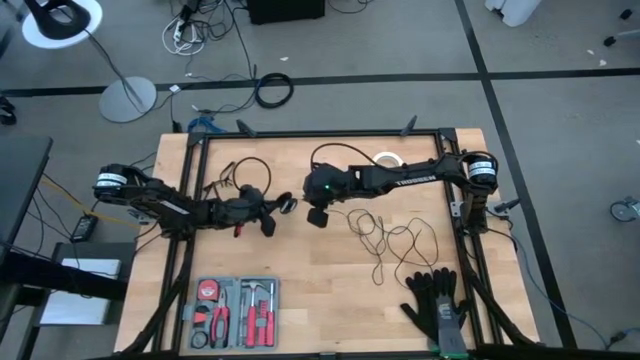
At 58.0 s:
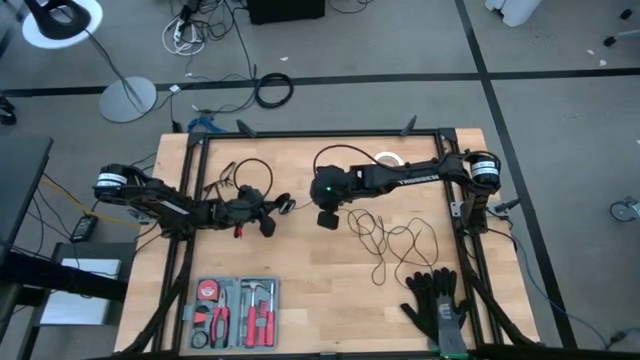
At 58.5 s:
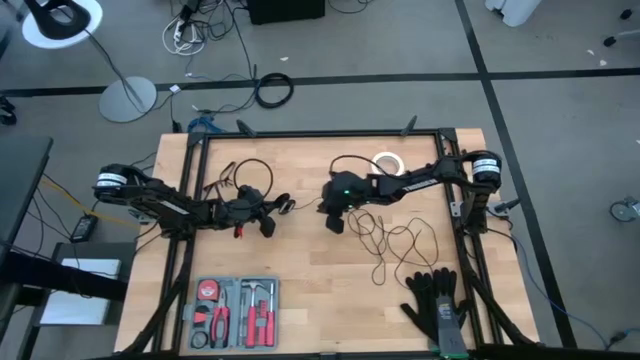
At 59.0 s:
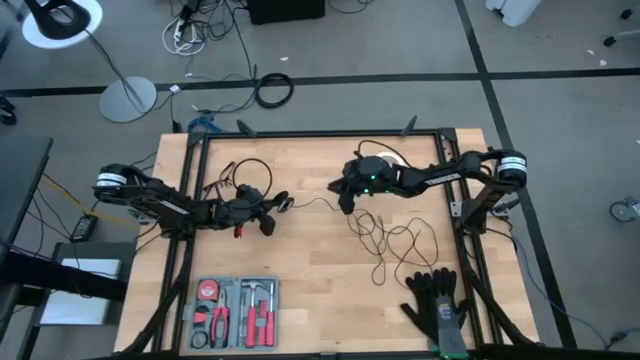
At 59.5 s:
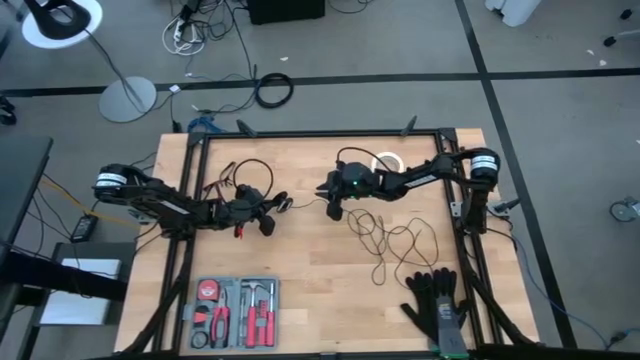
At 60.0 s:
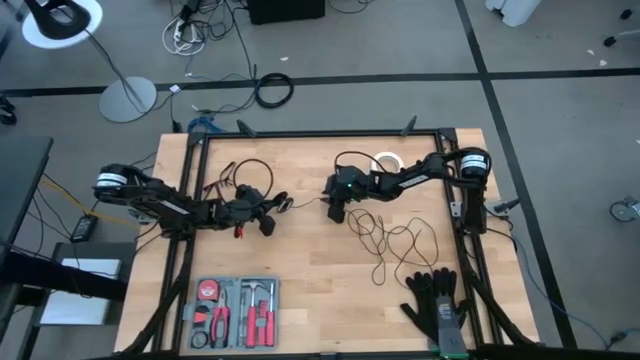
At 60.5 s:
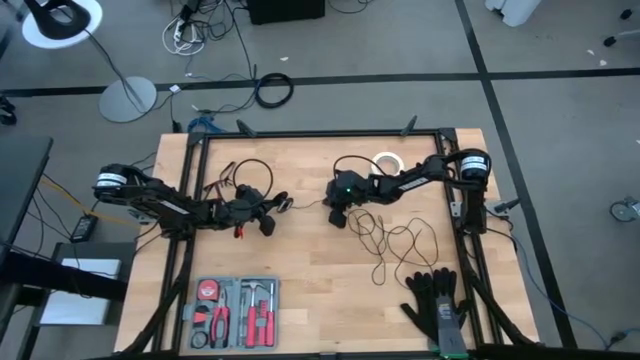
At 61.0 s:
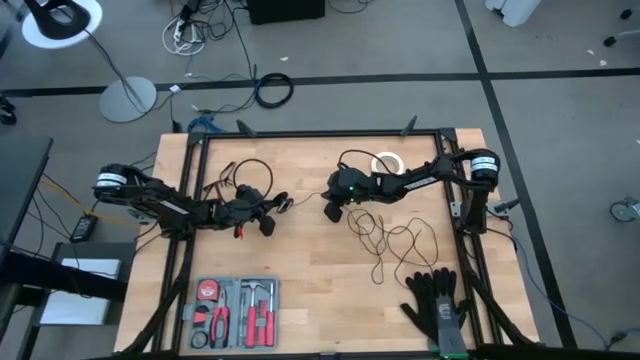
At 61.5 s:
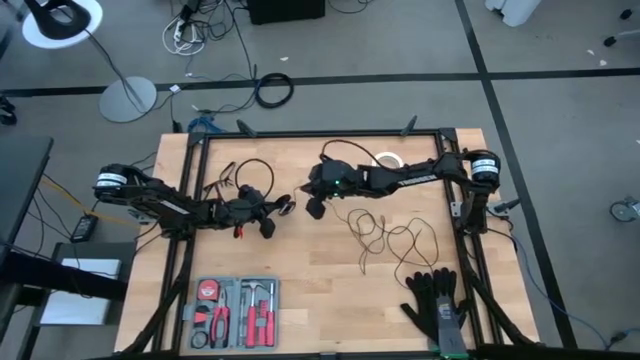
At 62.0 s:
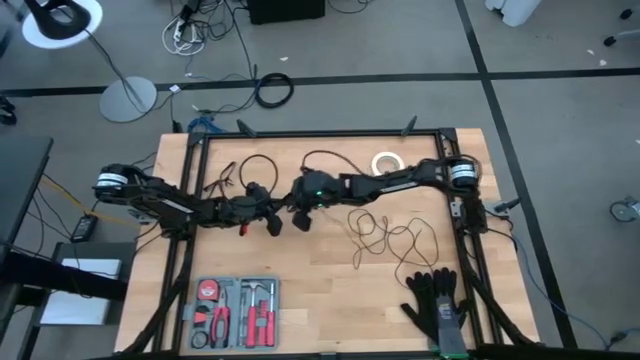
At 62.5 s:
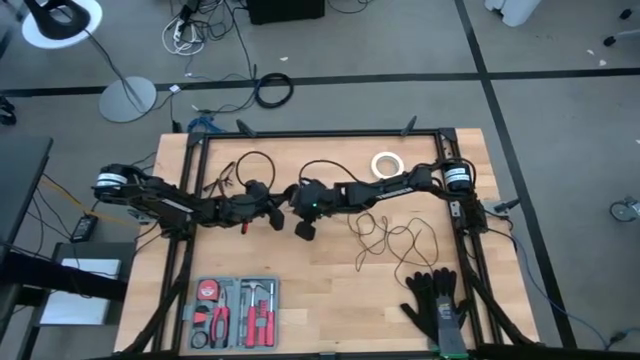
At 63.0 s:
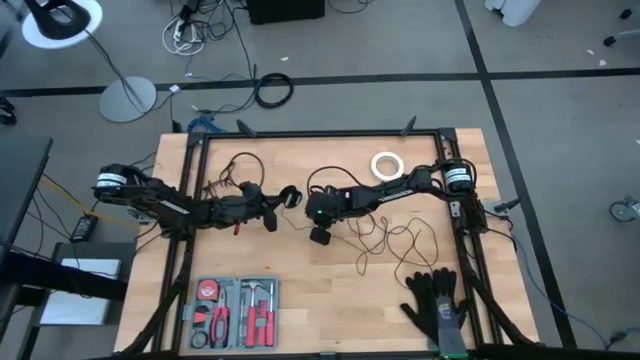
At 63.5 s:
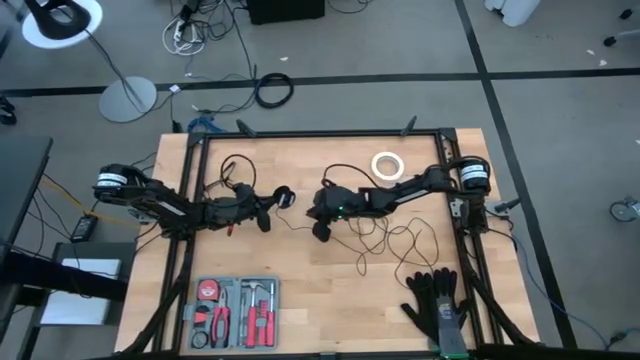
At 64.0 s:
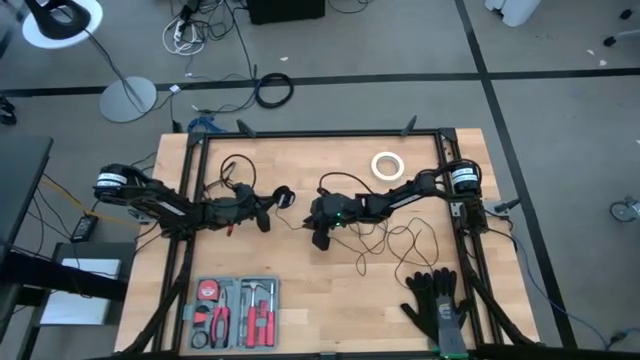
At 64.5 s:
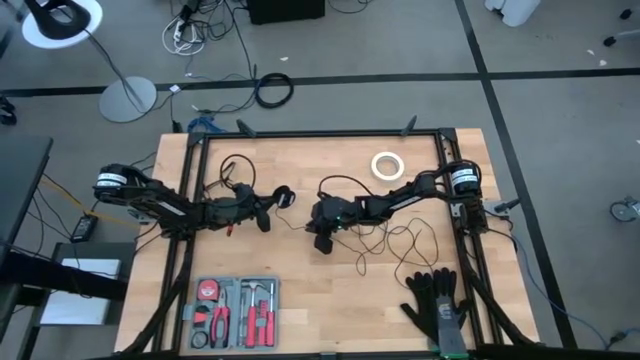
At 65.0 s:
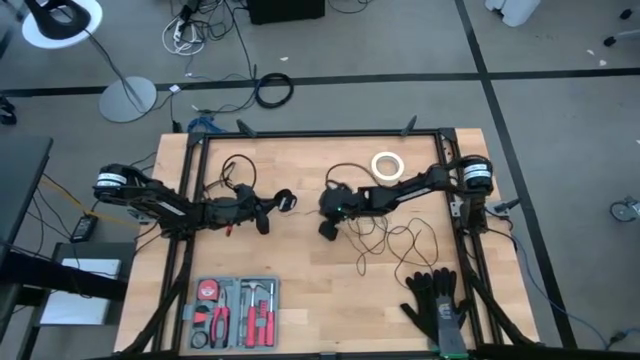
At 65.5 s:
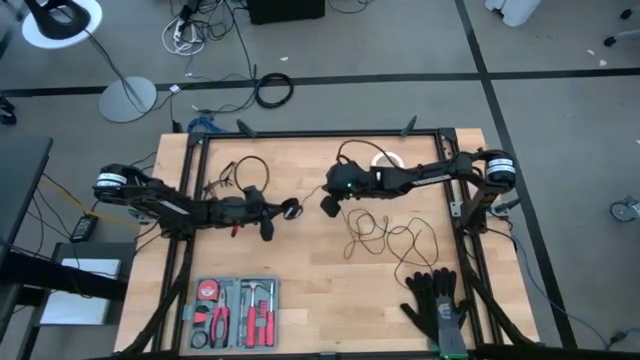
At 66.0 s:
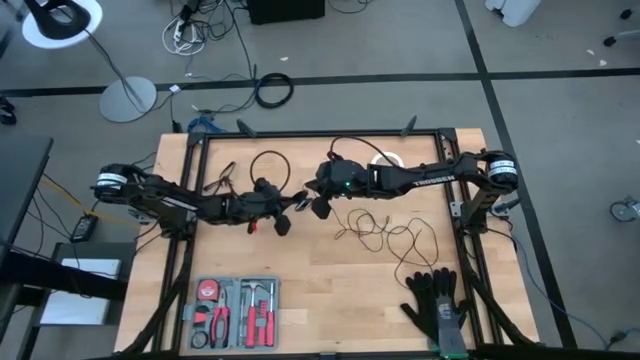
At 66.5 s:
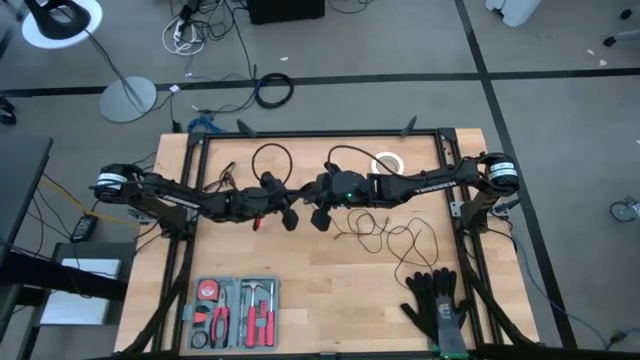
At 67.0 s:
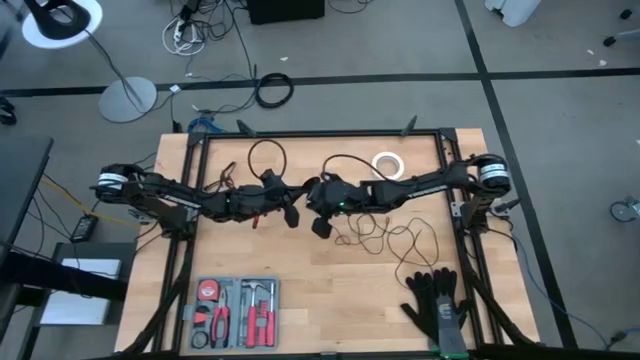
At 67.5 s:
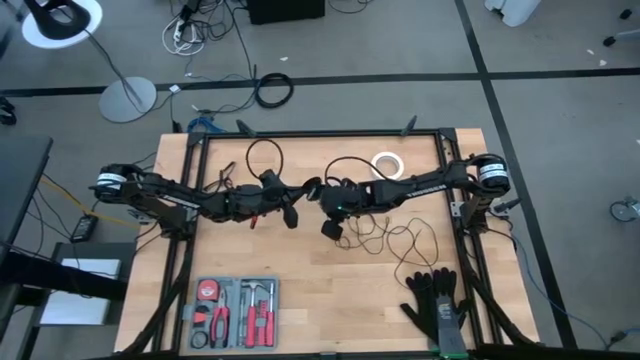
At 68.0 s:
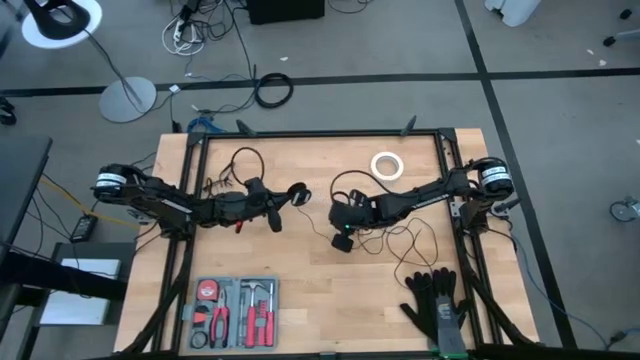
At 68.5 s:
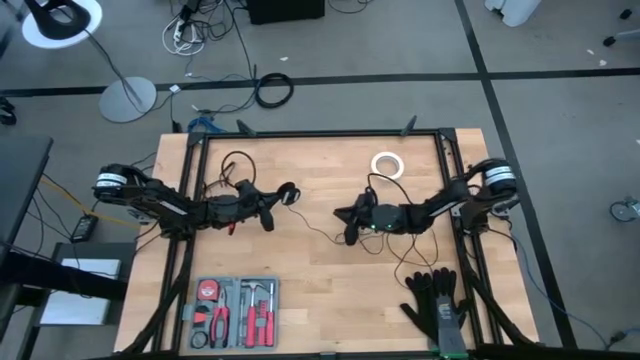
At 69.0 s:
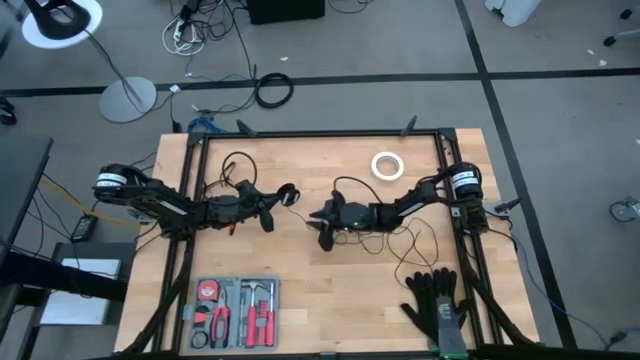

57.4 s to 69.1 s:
Task: Coil cords
Coil the black wire on the black spool

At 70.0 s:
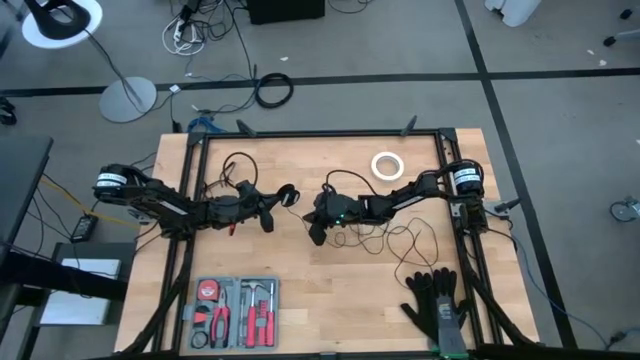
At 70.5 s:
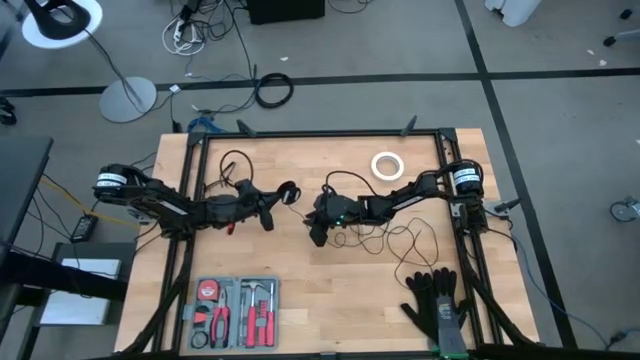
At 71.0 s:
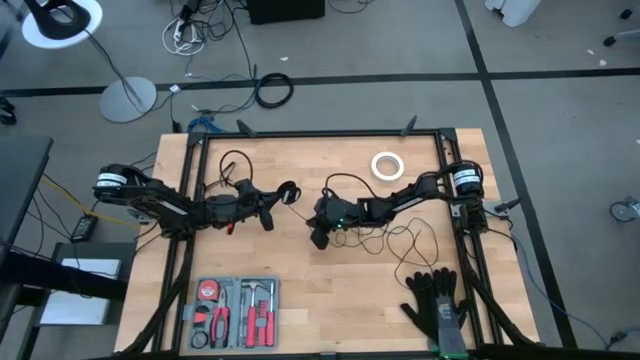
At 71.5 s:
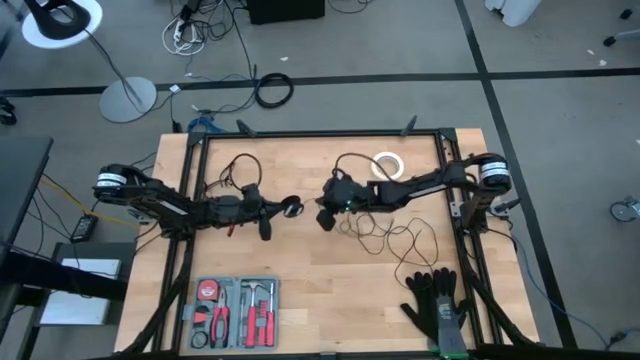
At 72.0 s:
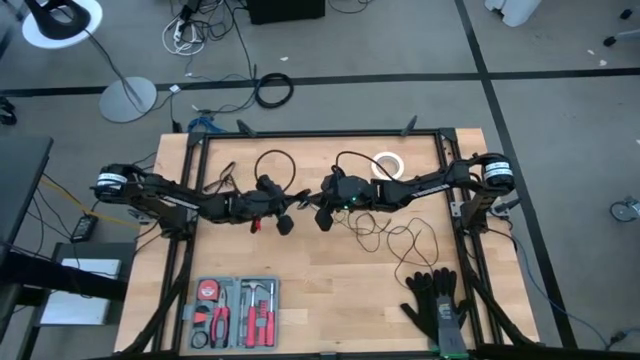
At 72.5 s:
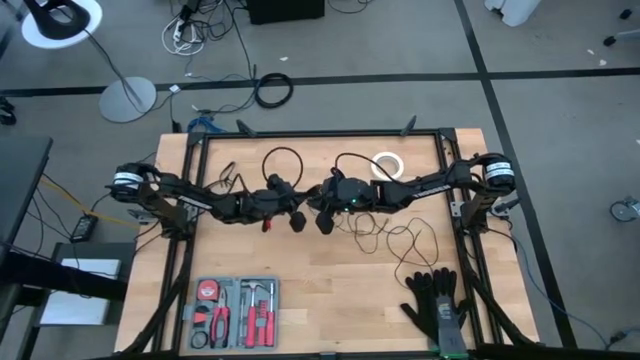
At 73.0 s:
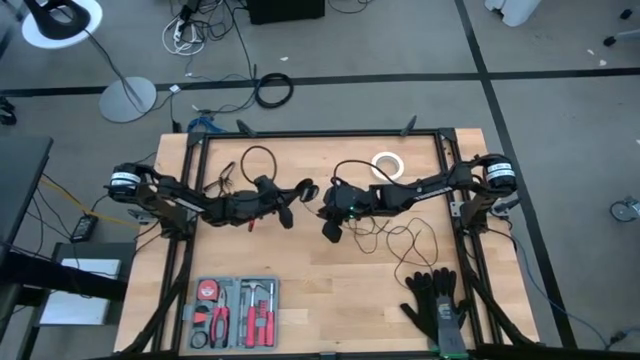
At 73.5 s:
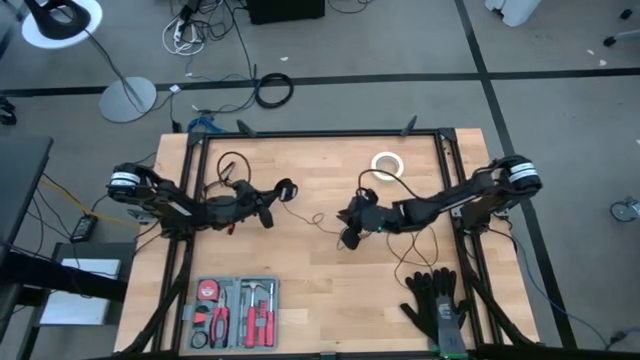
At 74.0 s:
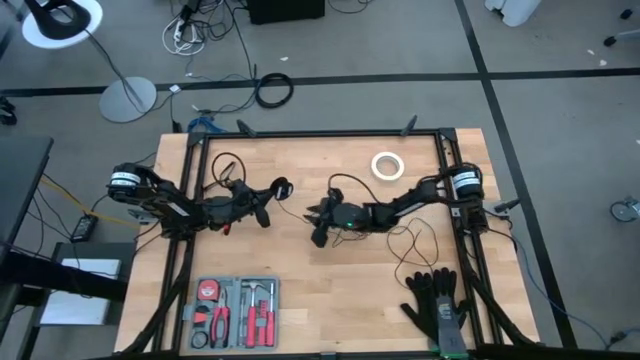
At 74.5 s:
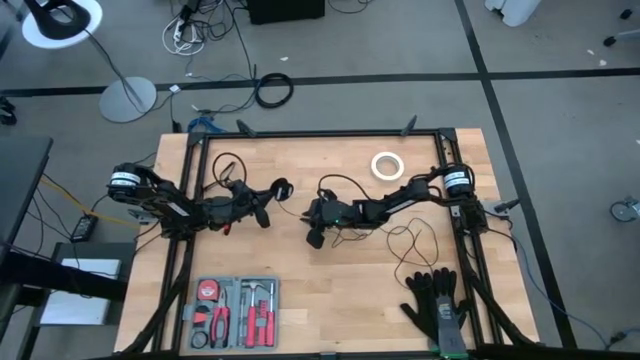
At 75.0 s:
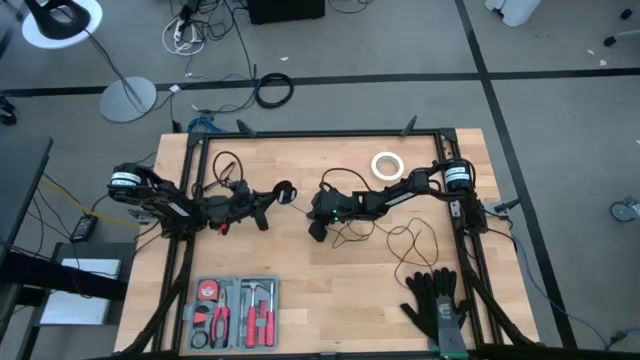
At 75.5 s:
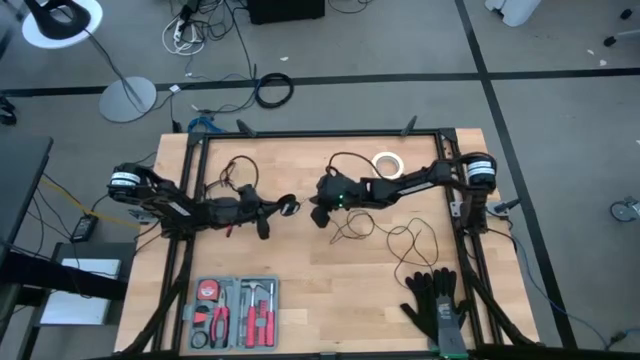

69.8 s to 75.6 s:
Coil the black wire on the black spool

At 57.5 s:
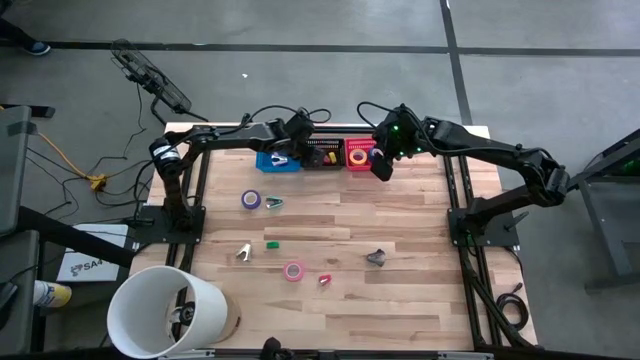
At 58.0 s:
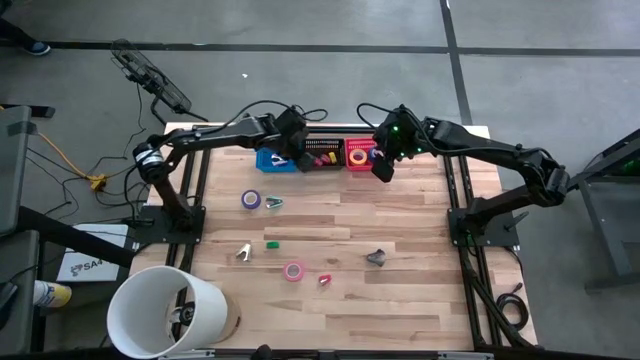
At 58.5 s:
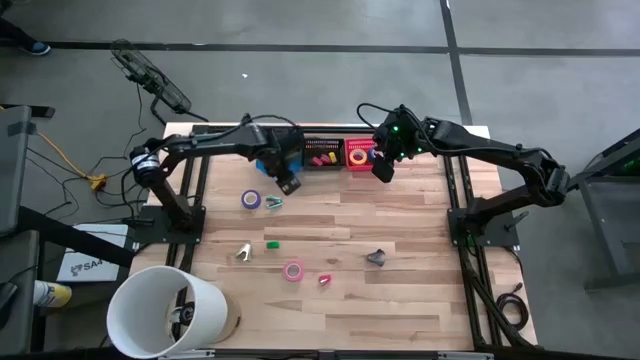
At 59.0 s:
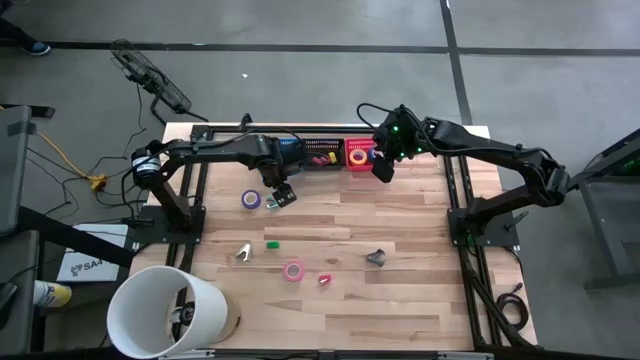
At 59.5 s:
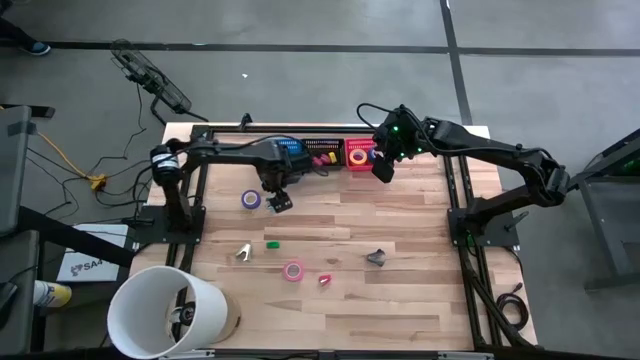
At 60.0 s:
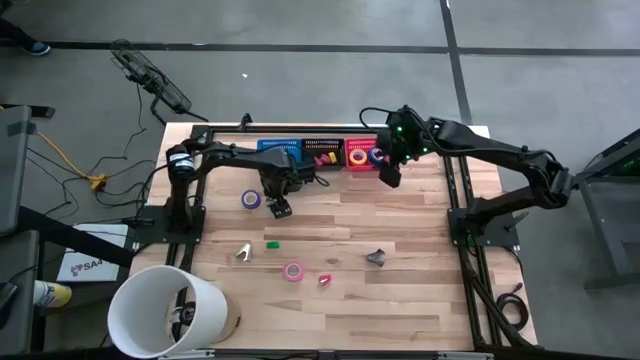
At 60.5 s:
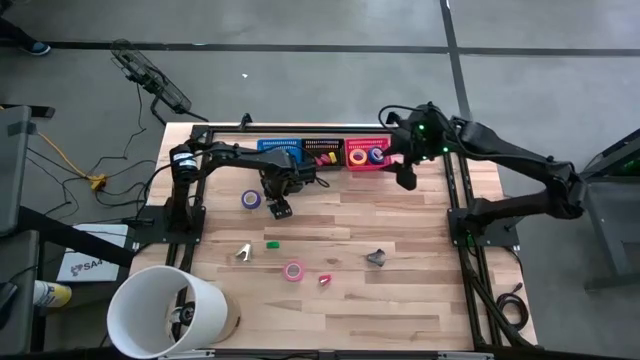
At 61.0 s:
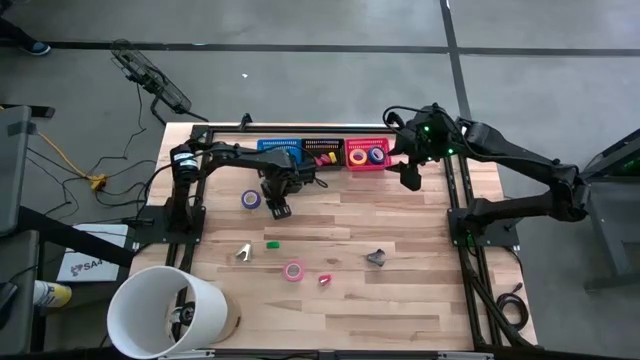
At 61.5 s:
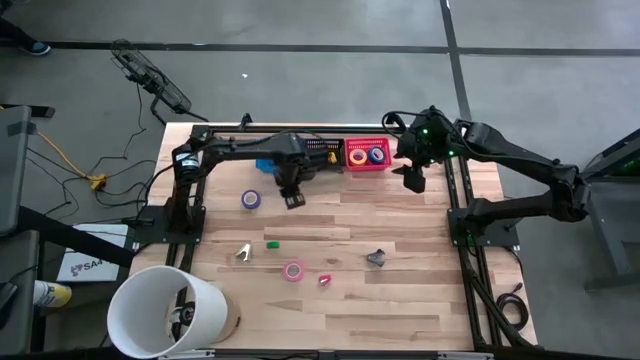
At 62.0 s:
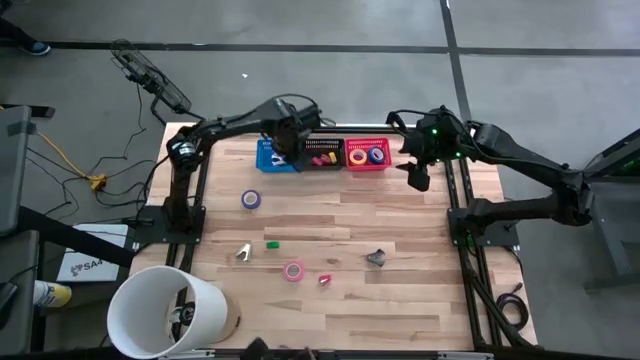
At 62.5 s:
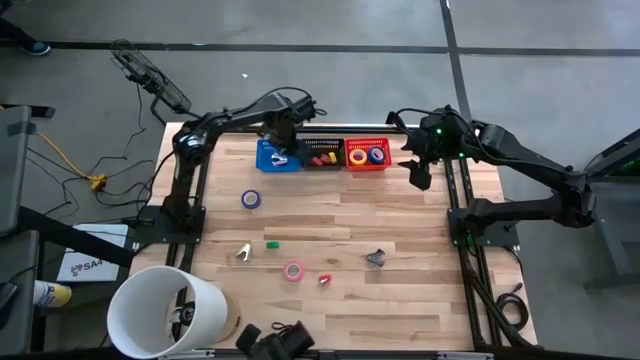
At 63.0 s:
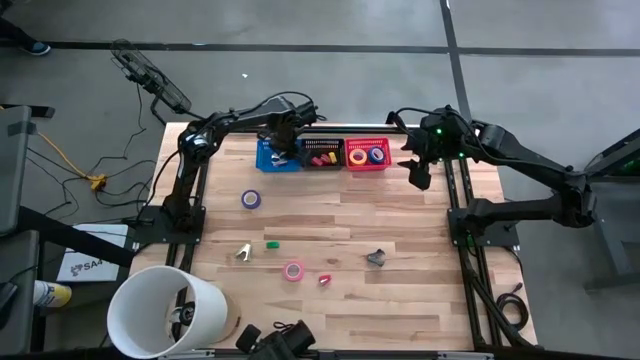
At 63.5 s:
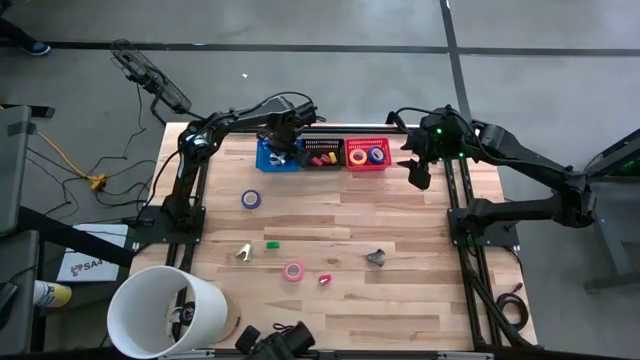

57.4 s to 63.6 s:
Task: Pick and place Stapler, Stapler remover, tape
Put the blue staple remover into the blue bin
